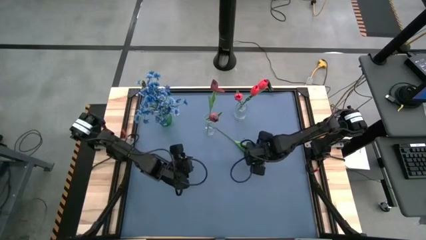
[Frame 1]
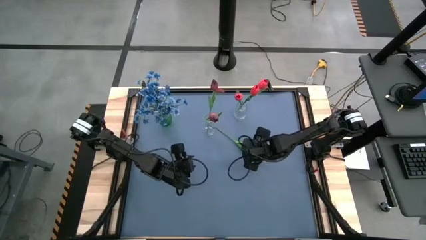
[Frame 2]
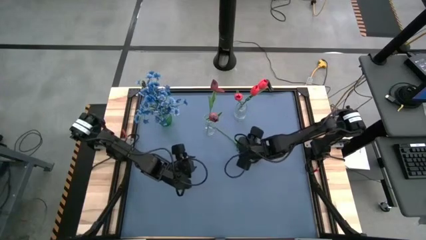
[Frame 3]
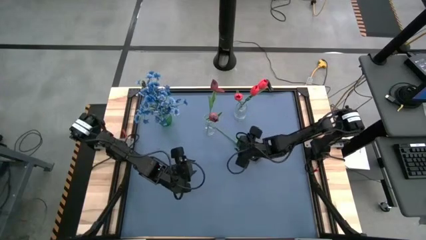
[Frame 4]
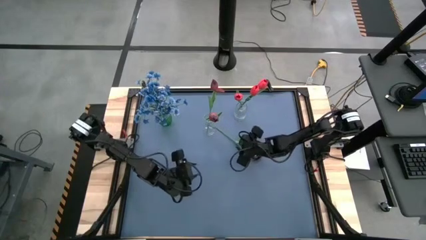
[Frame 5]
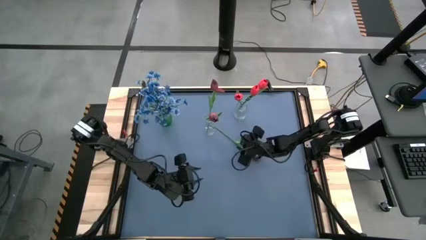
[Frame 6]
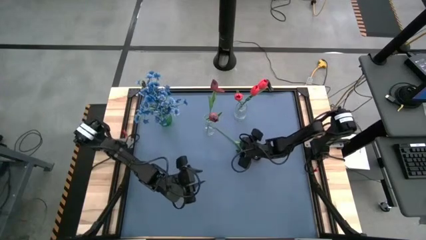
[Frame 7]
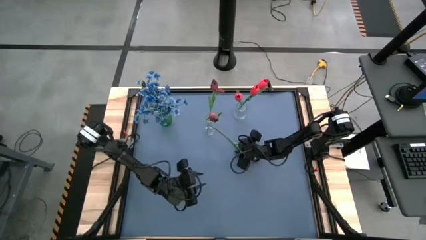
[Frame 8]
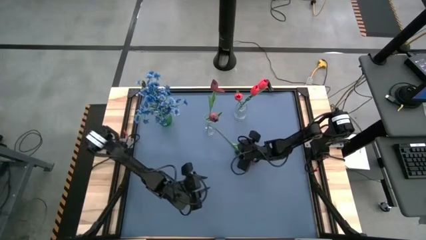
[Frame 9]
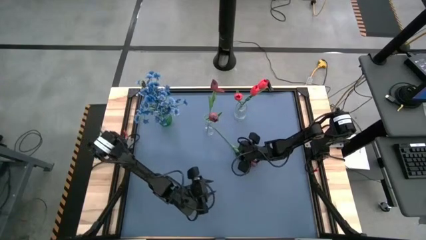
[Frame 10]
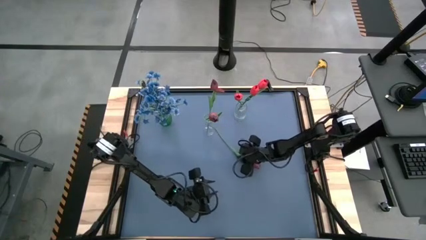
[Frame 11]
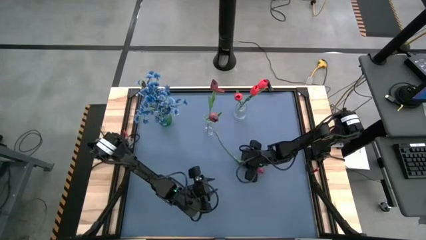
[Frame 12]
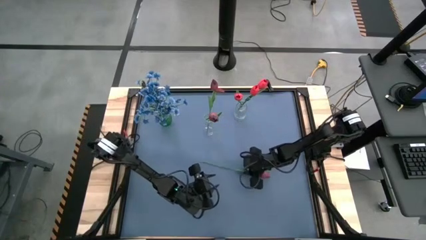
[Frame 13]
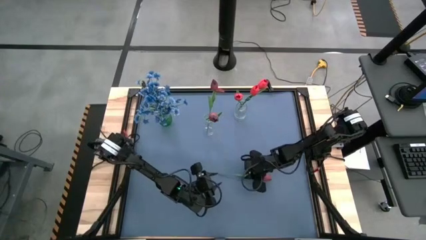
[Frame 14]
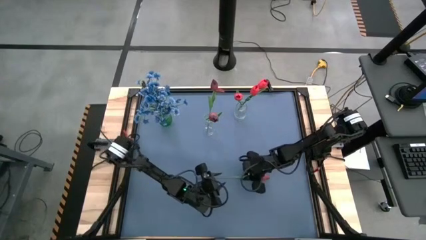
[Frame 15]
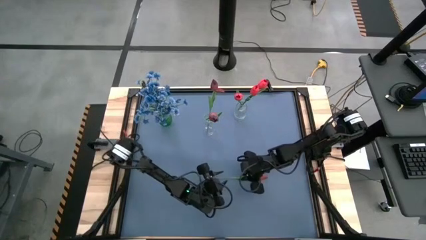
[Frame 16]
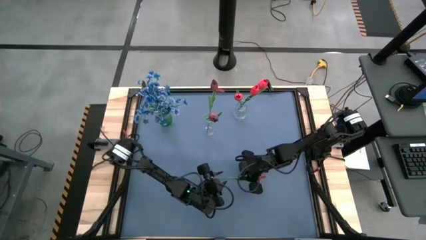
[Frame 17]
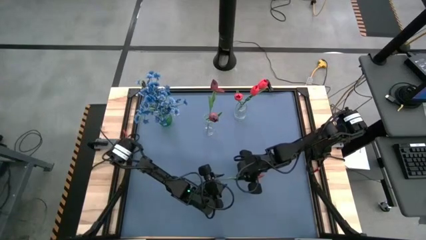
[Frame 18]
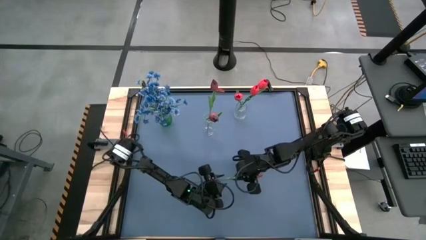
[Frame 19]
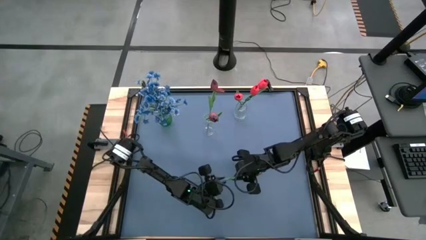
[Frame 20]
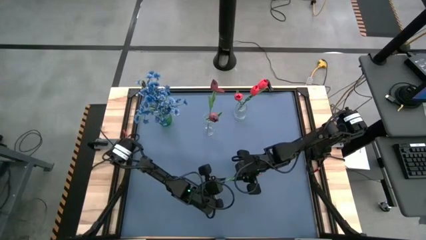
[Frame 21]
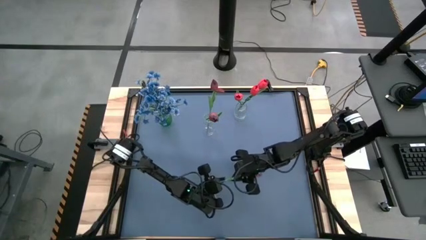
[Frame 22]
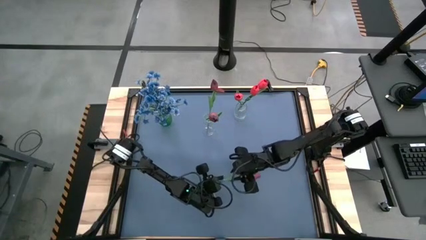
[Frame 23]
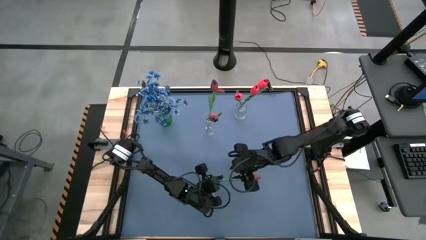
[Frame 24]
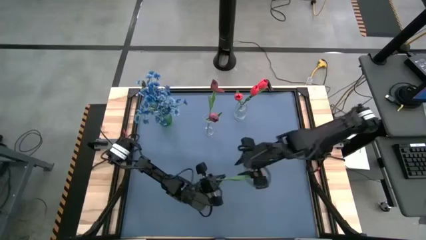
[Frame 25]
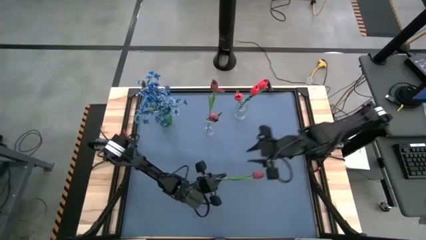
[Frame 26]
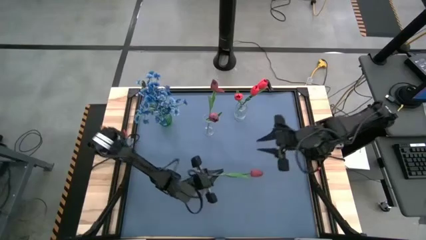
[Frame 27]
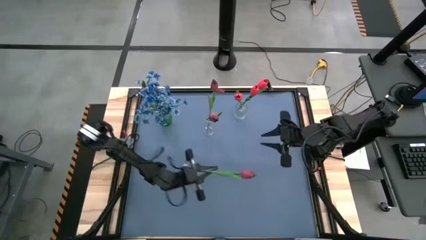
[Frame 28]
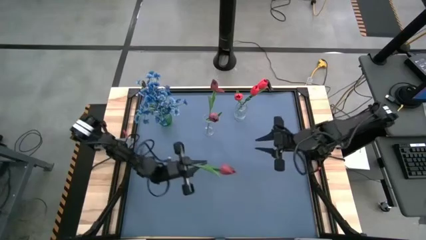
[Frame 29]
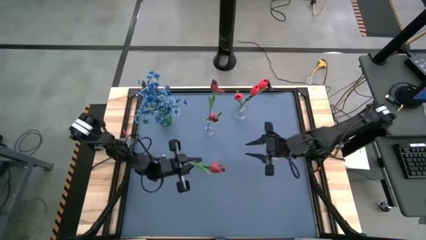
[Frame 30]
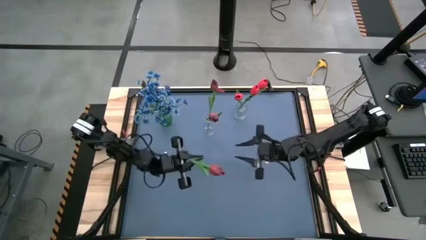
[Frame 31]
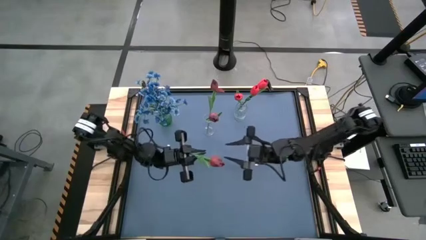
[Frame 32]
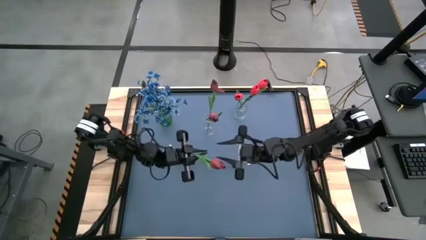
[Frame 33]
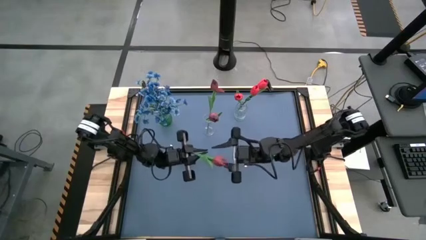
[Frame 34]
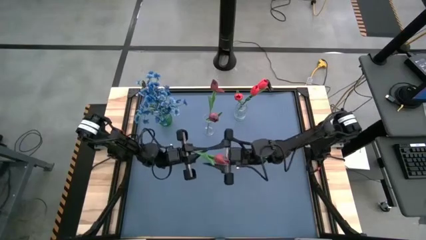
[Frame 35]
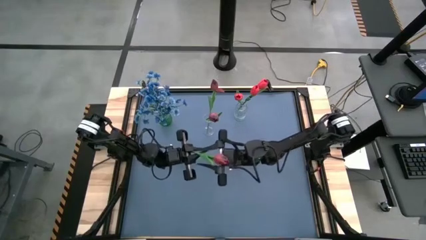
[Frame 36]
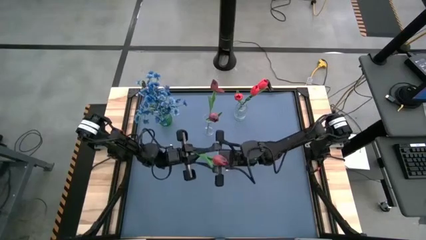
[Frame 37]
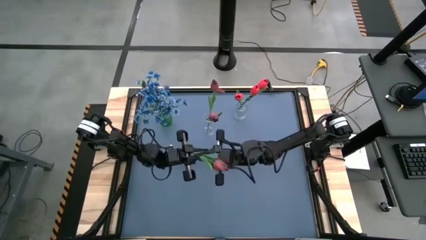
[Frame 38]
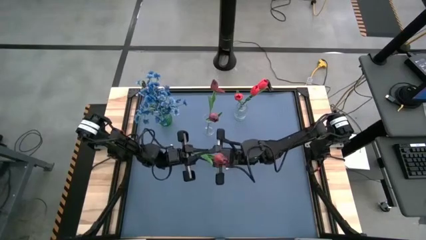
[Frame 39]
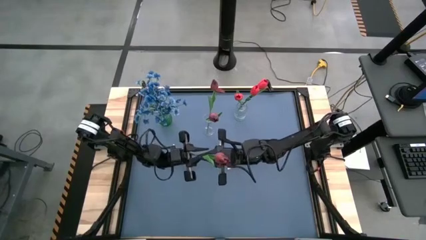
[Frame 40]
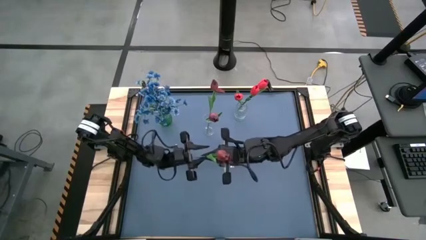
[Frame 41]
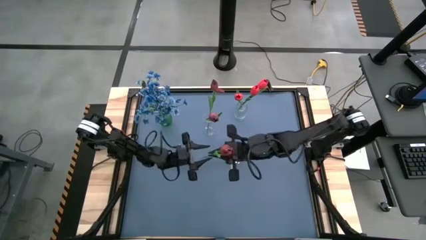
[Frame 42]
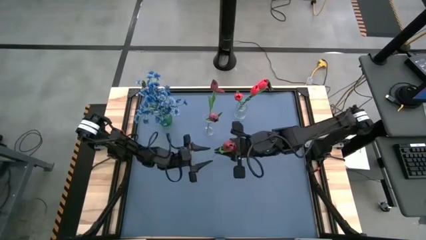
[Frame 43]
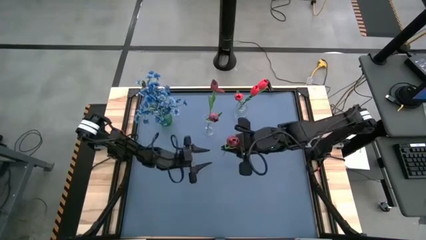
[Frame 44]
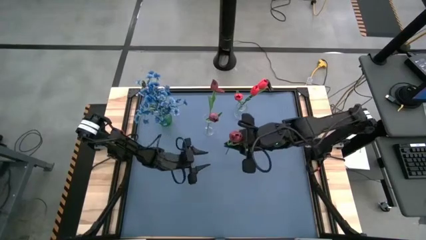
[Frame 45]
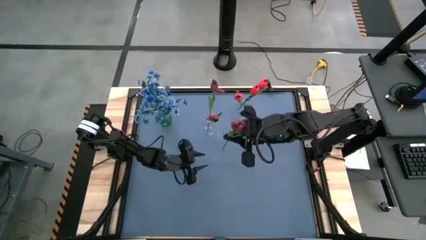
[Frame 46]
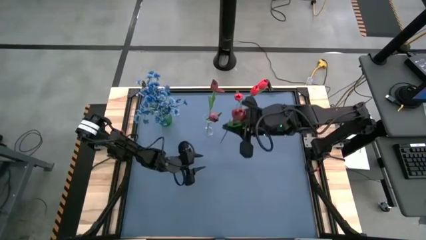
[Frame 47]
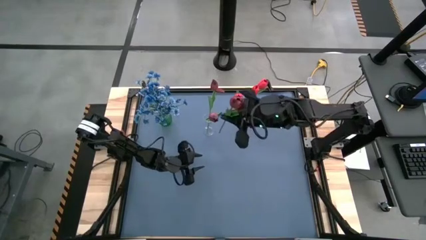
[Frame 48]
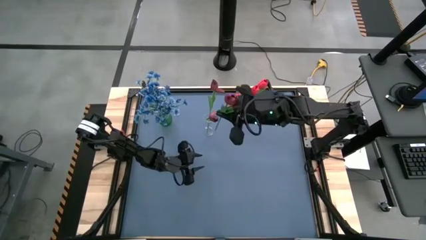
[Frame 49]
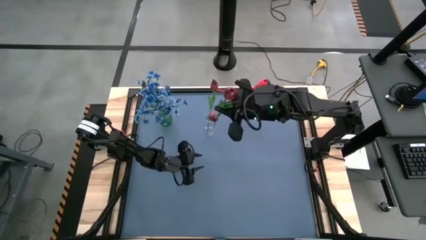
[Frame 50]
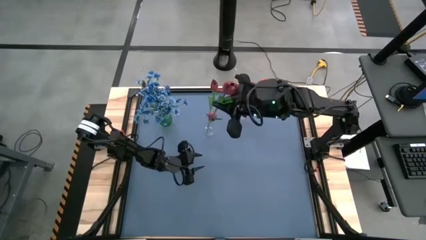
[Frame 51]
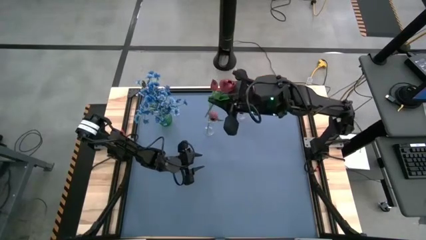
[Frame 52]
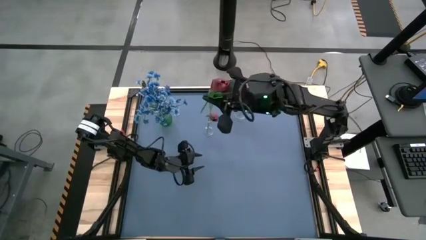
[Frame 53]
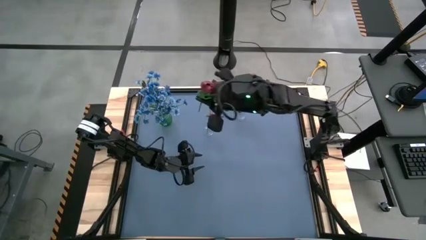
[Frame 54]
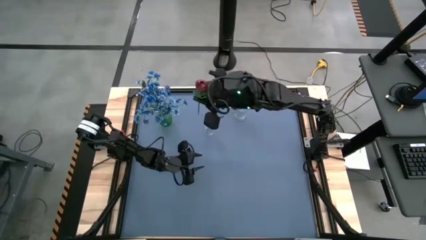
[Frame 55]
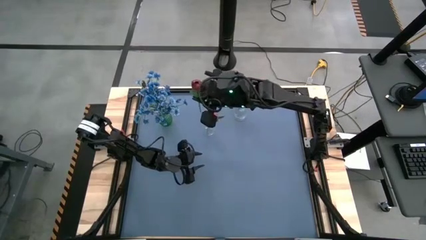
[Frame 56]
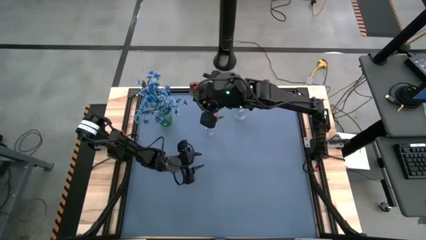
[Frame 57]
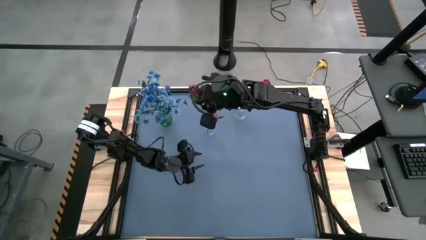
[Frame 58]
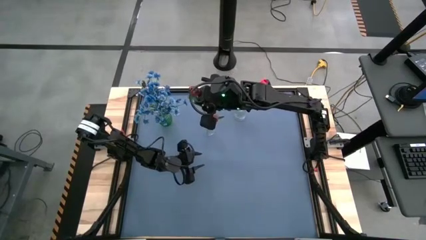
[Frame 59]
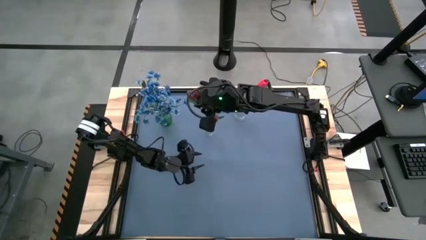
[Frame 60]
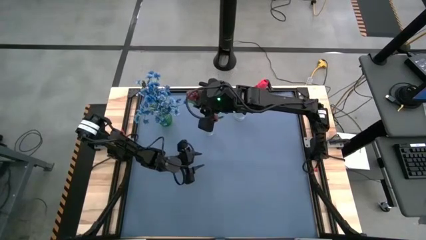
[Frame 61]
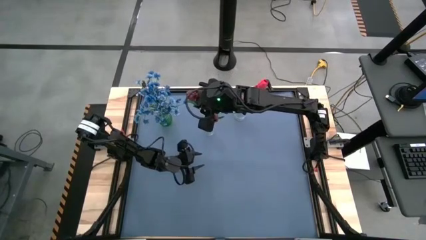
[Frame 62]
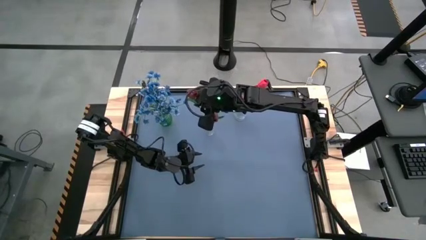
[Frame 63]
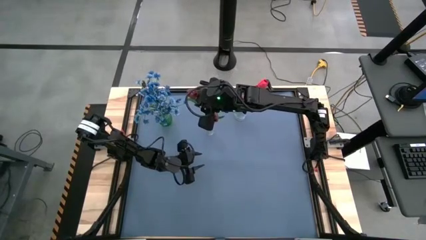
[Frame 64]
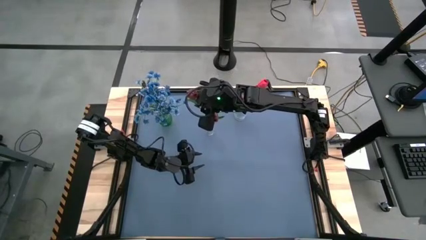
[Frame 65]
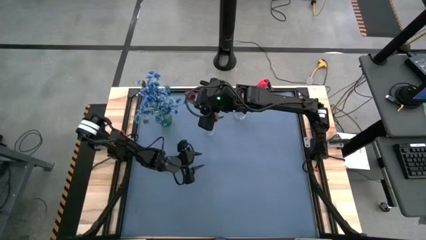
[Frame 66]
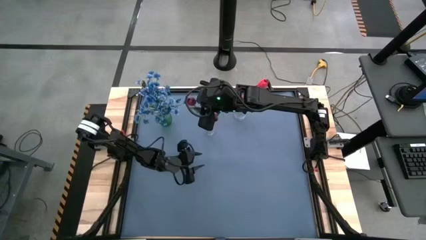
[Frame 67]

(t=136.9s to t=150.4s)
Task: Sort flowers into vase by color
Put the dark red tulip into the bottom transparent vase
